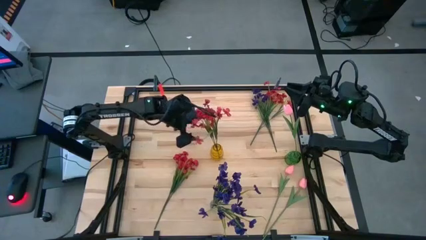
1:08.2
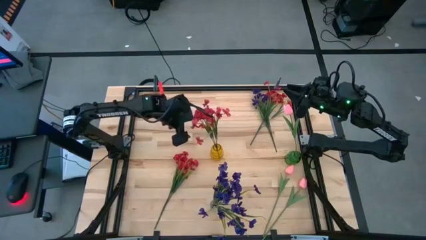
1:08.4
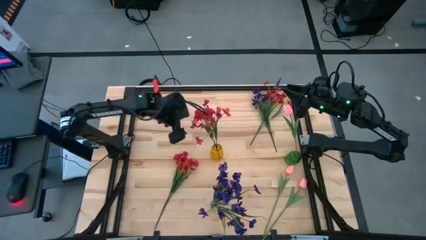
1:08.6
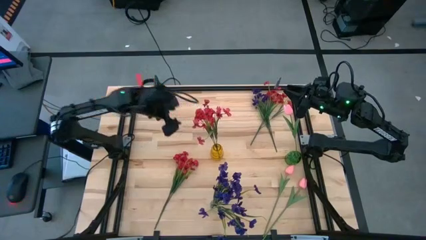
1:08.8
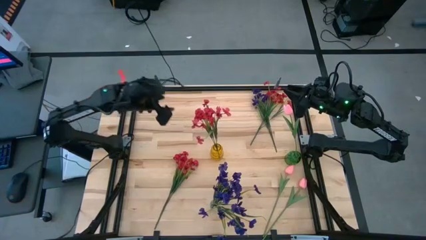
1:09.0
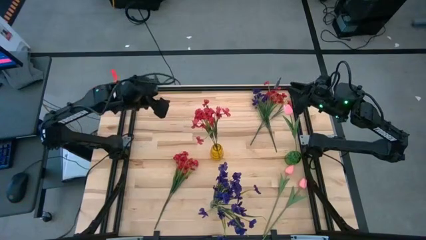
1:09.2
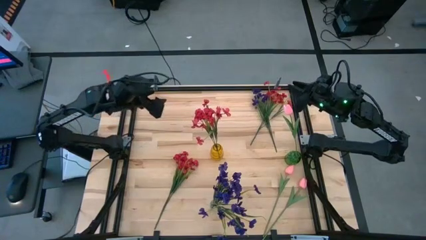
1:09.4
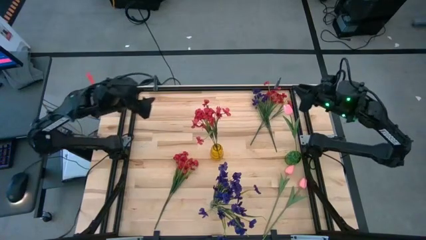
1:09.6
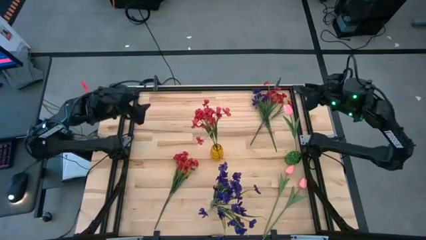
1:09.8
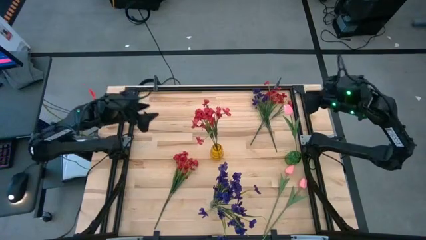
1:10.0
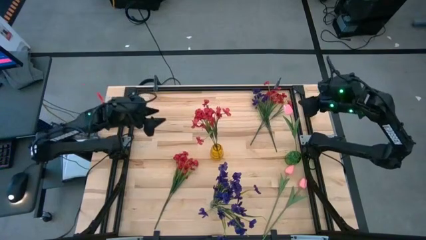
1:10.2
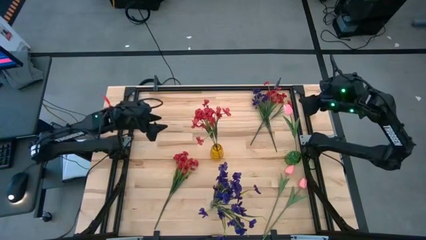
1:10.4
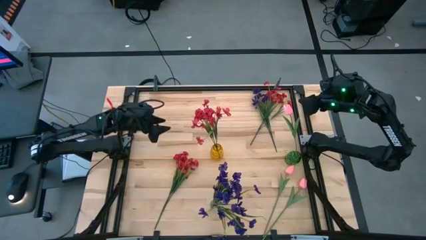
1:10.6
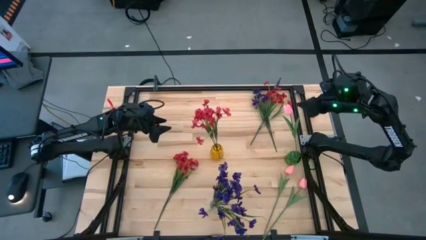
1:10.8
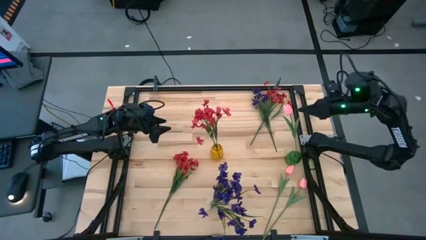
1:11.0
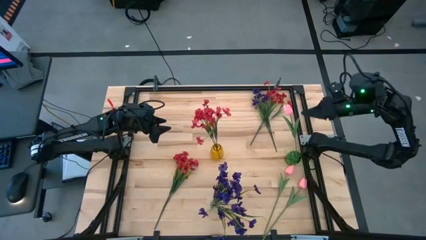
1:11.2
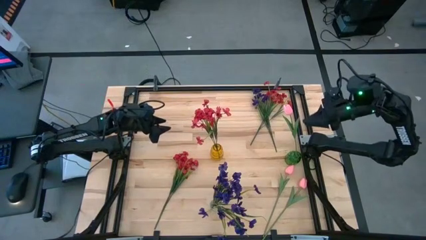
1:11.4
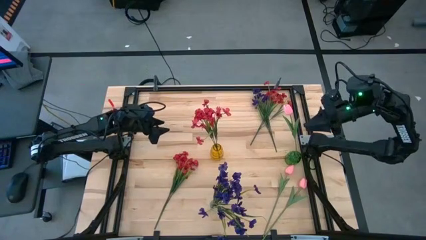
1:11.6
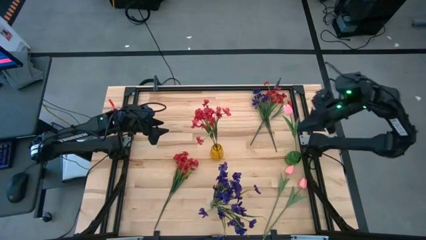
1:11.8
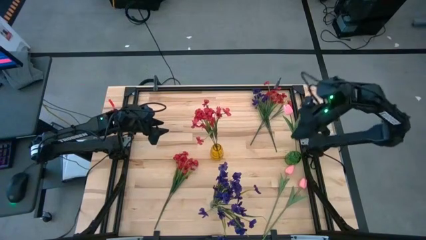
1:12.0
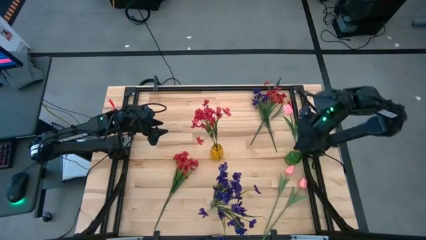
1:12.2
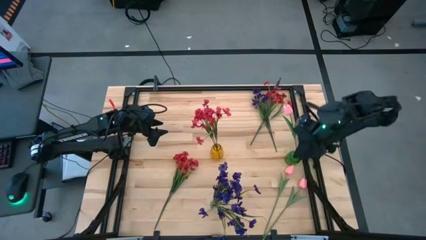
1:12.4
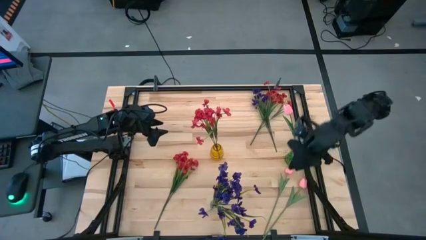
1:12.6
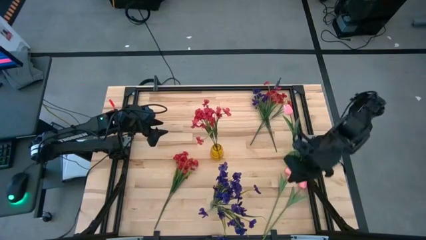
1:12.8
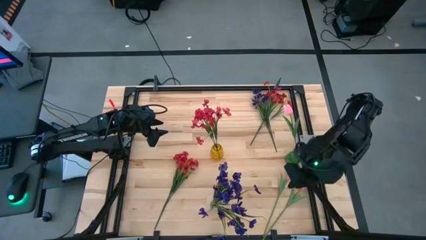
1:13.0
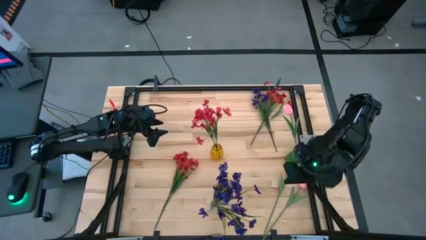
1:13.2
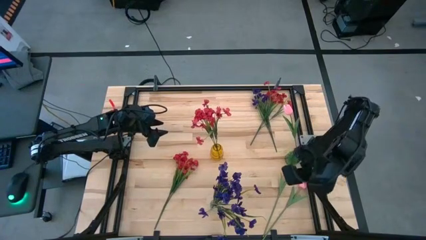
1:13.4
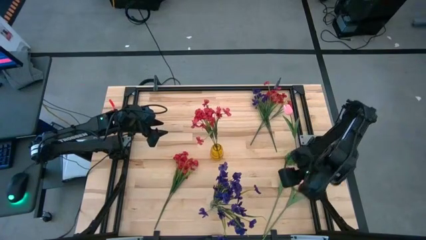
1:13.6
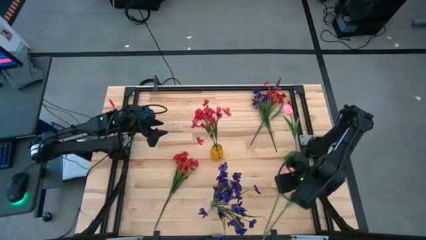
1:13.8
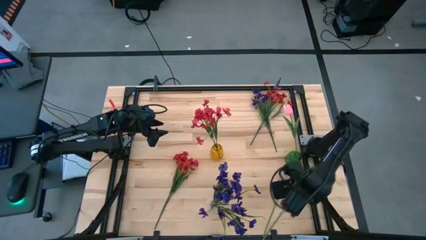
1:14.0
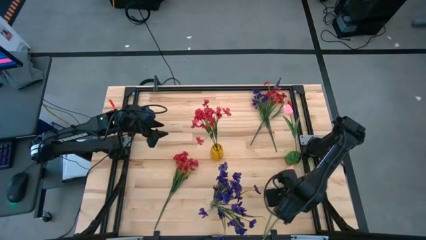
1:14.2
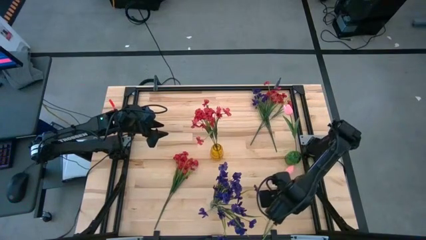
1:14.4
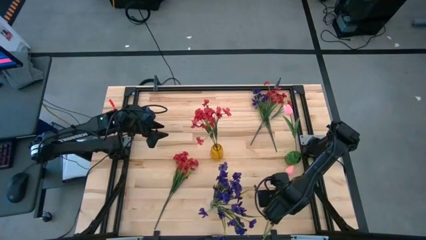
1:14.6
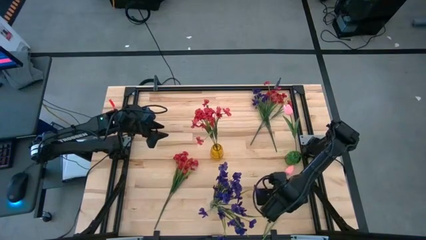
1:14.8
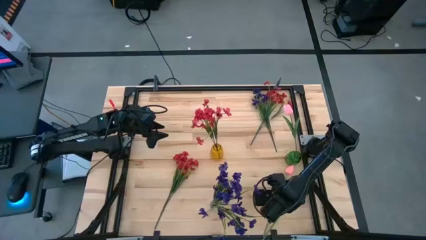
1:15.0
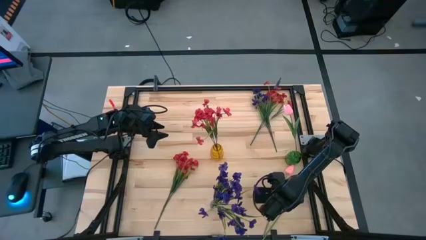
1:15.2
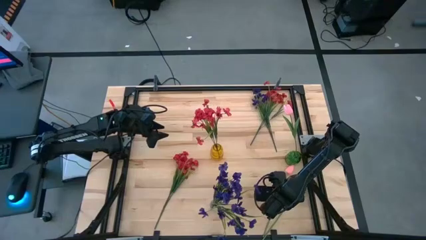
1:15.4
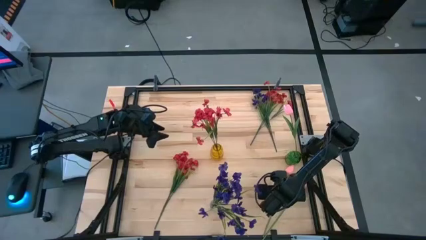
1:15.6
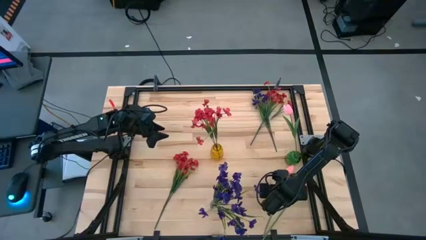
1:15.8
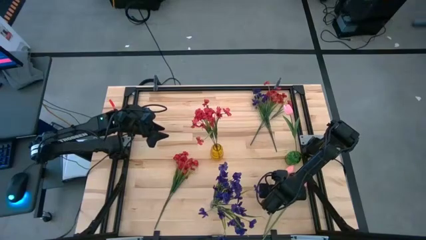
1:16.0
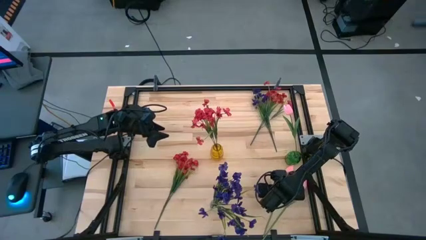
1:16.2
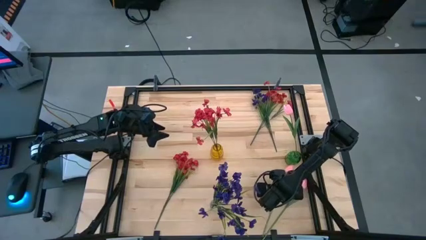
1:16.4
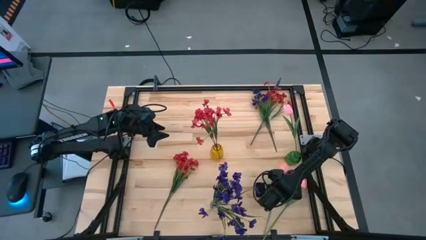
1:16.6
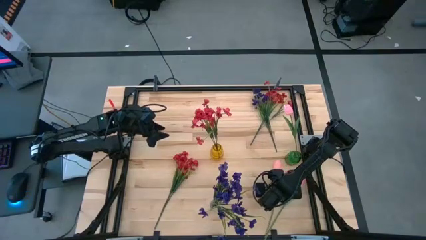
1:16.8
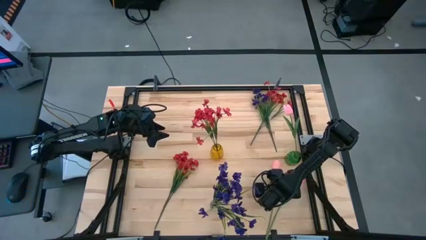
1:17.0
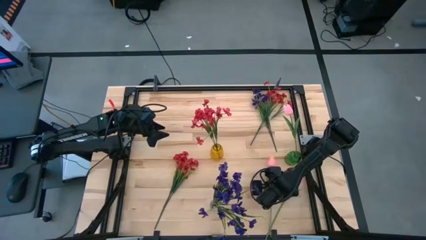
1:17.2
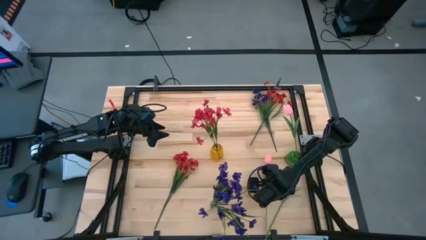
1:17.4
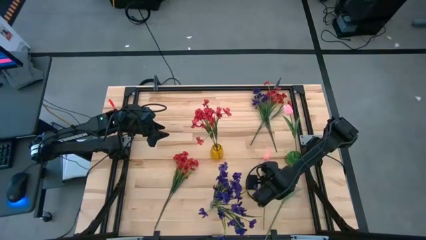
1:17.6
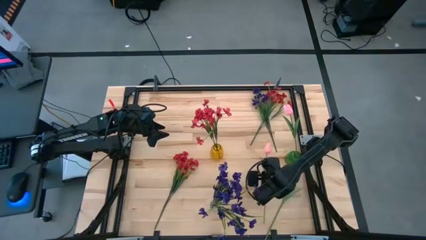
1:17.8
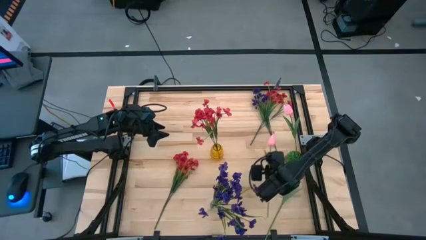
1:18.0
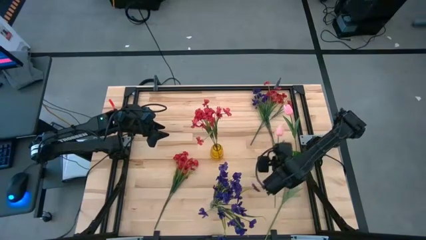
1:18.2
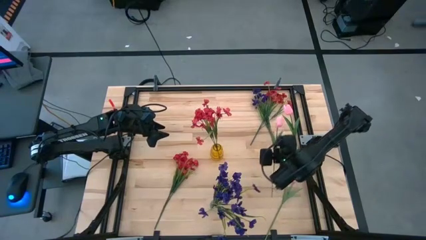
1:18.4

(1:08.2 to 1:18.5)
Task: Sort flowers into vase by color
Put the bottom left pink tulip into the green vase
